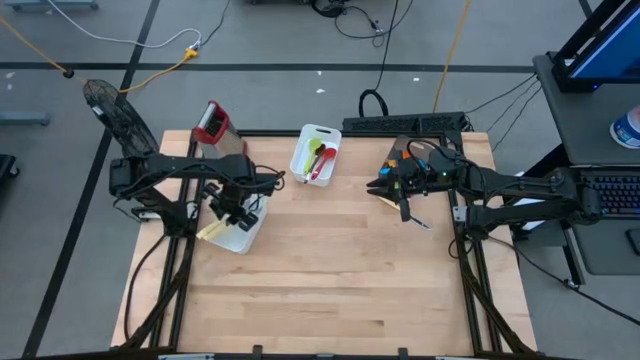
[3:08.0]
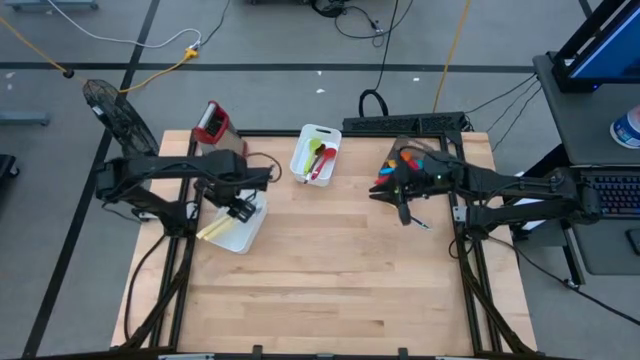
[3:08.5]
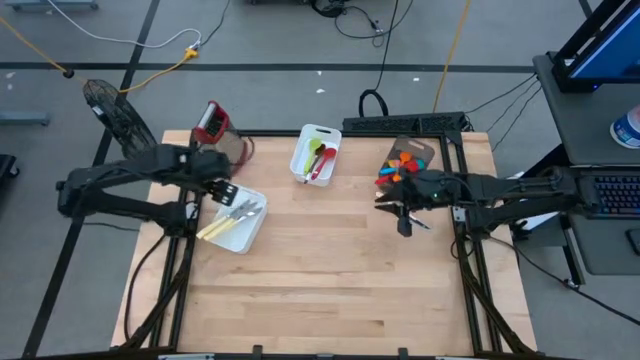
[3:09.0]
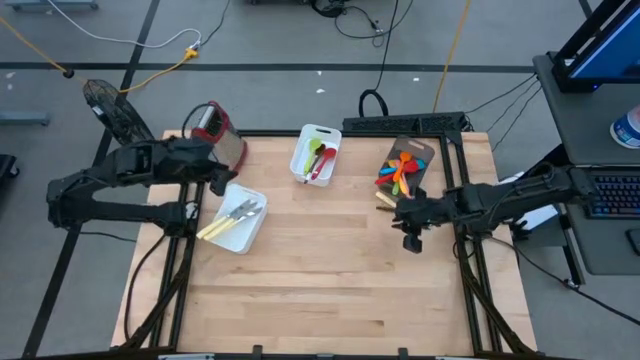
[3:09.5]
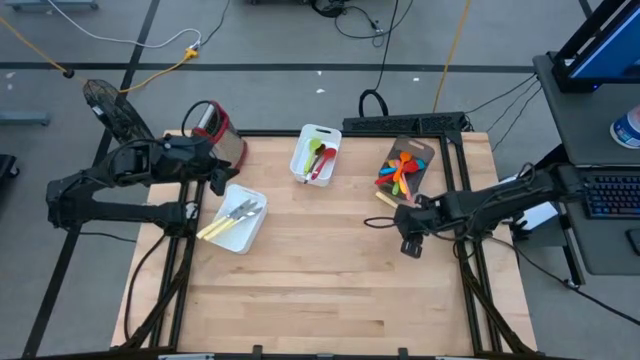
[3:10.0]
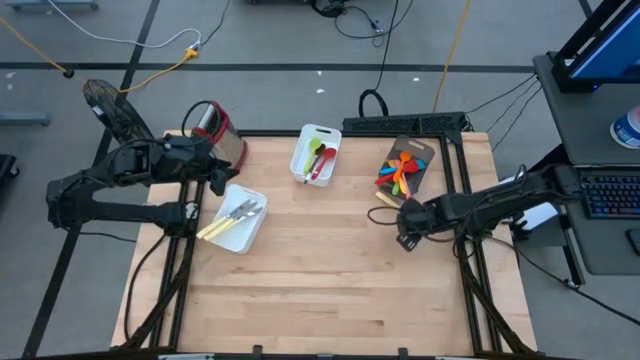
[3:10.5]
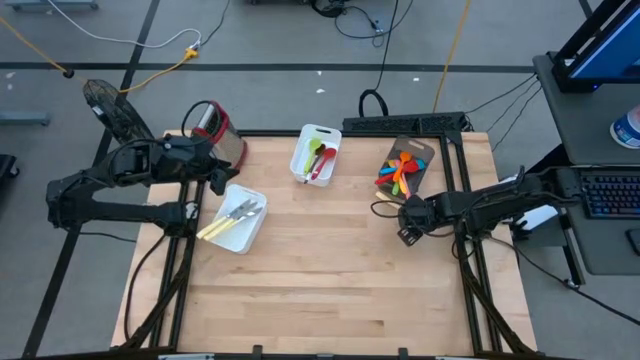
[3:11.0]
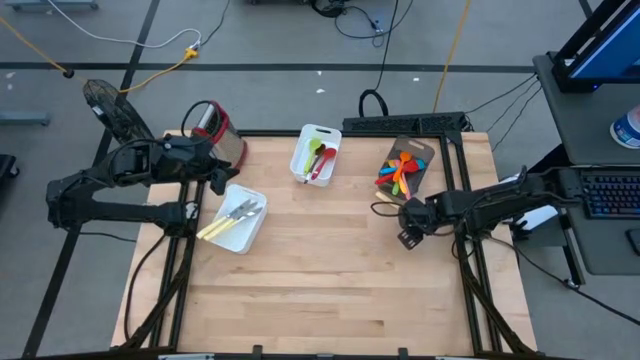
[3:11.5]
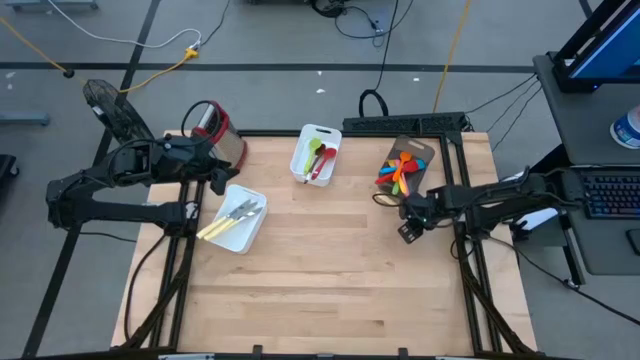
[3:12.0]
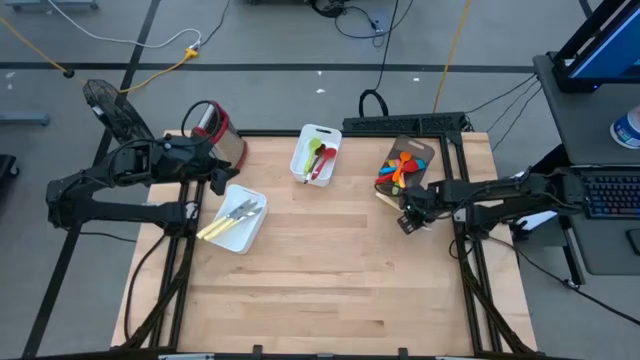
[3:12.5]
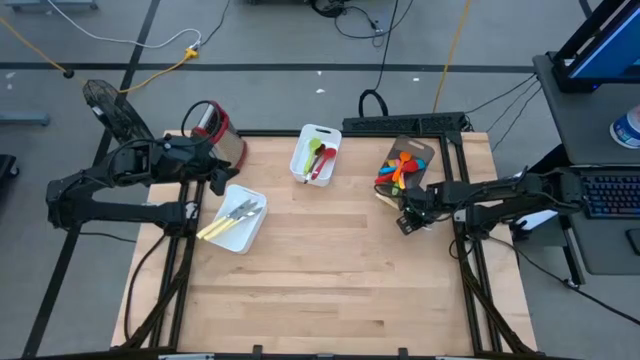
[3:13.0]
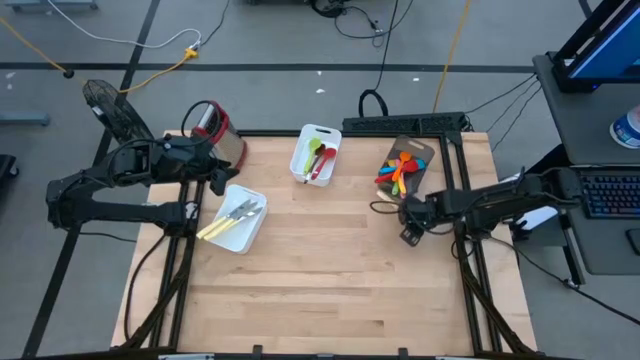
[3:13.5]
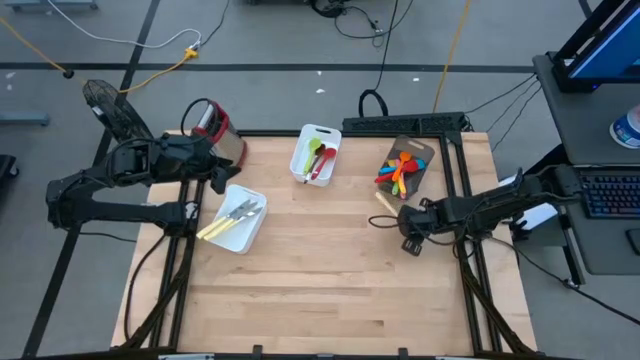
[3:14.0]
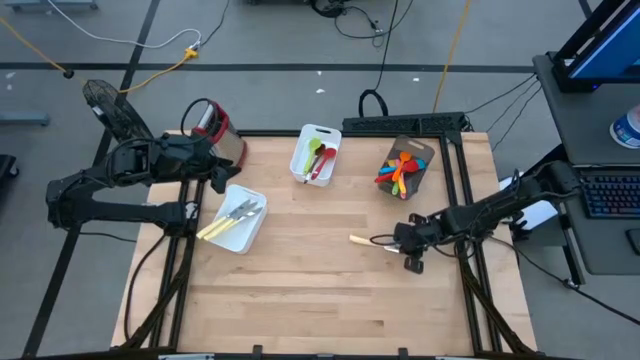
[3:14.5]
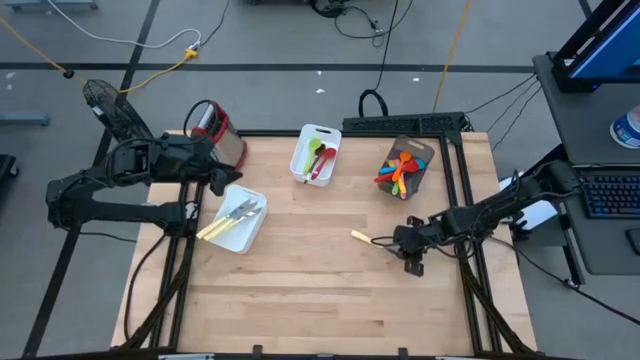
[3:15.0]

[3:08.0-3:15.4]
Task: Pick & Place Kitchen Items
Put the yellow knife into the bottom white bin

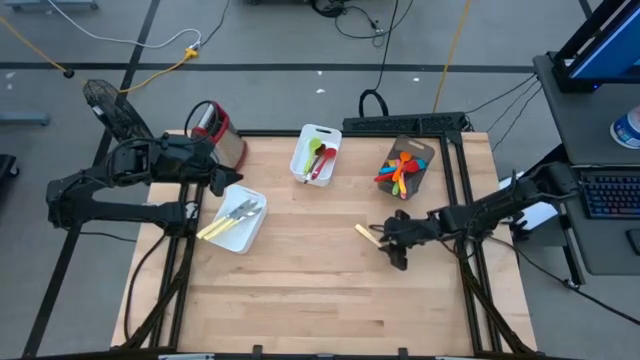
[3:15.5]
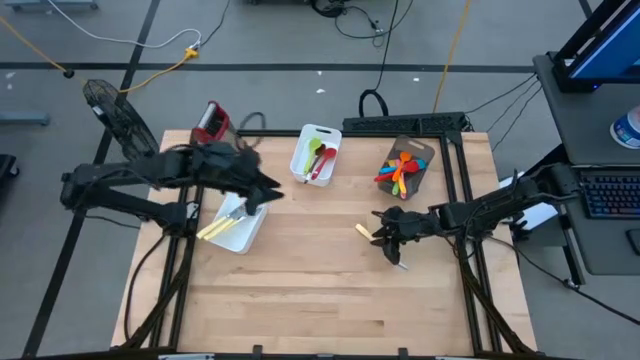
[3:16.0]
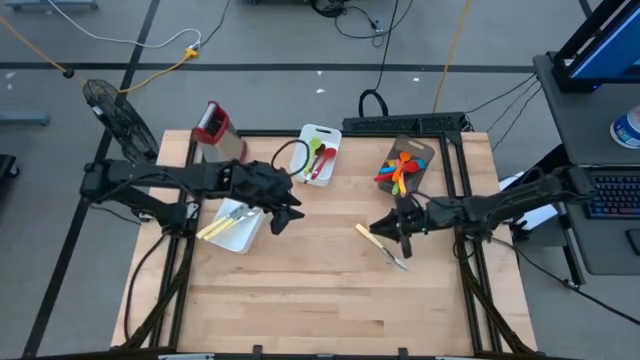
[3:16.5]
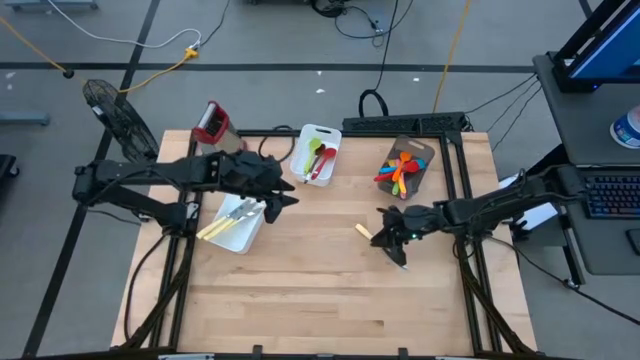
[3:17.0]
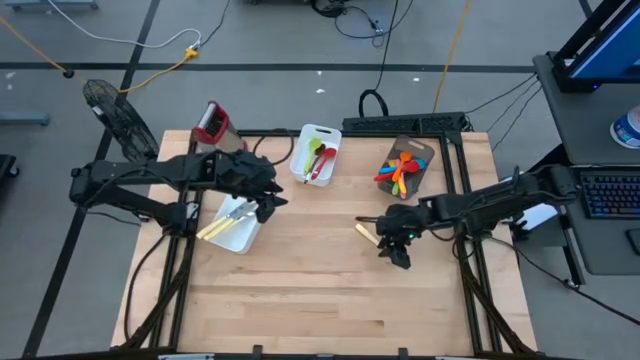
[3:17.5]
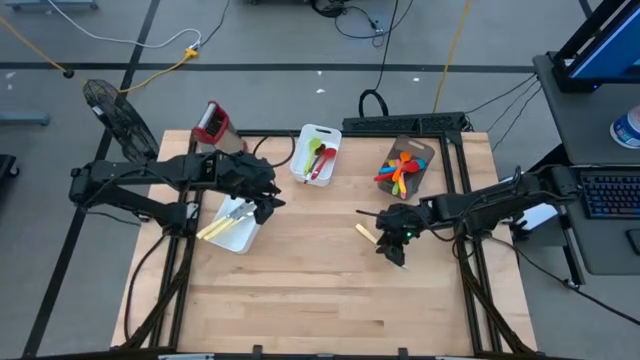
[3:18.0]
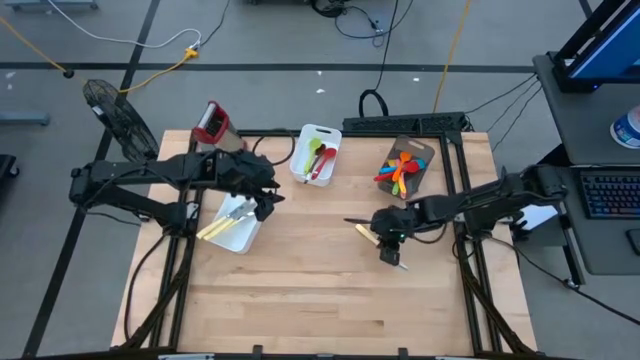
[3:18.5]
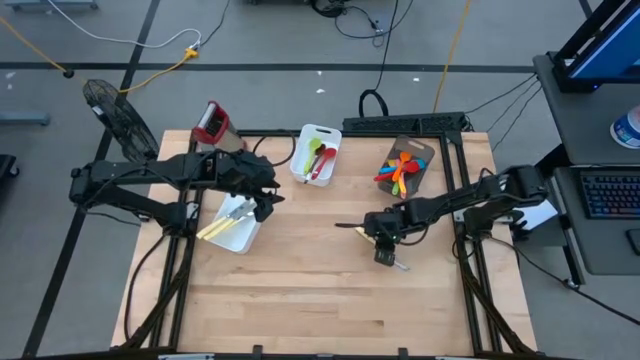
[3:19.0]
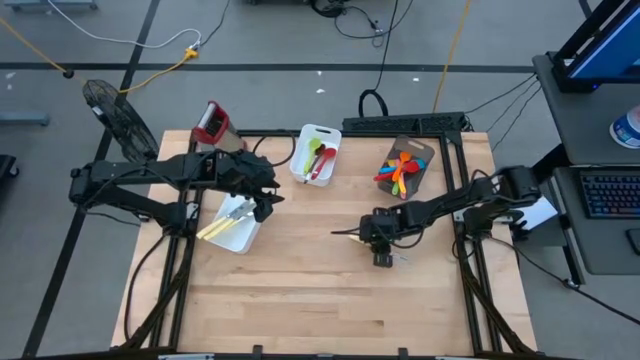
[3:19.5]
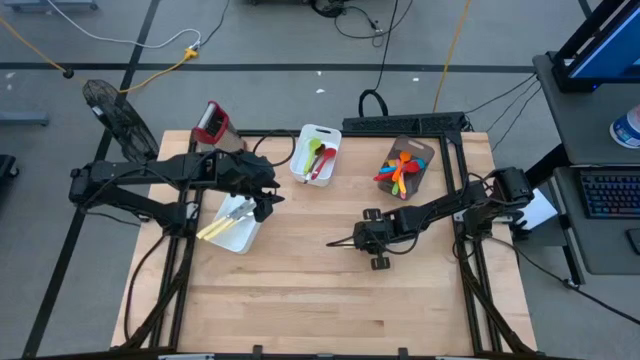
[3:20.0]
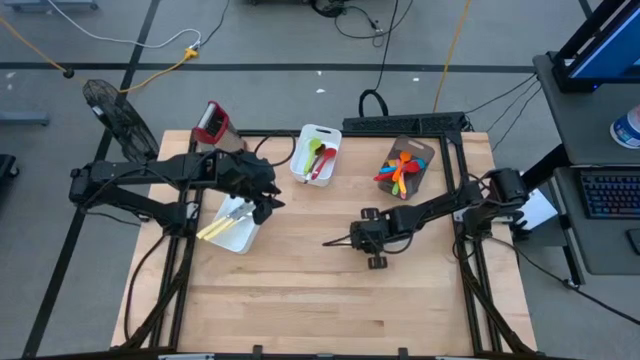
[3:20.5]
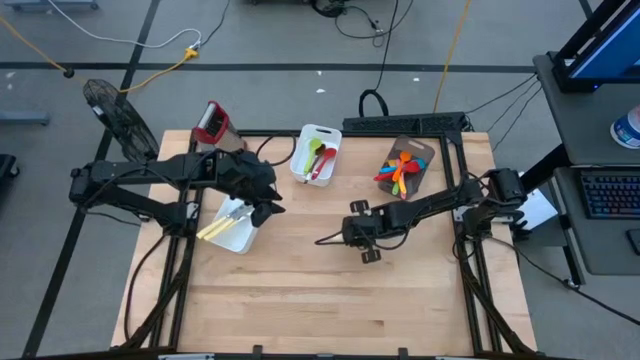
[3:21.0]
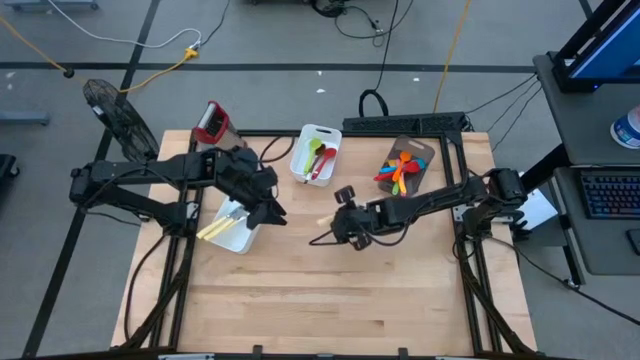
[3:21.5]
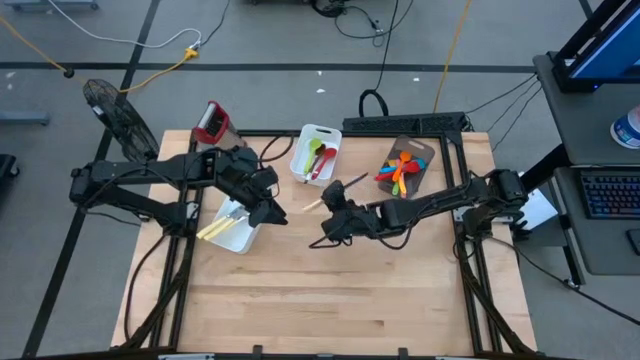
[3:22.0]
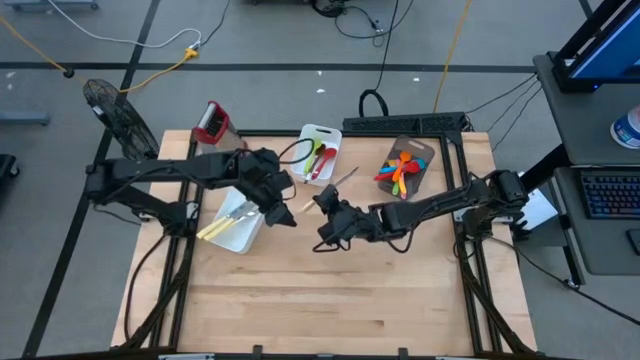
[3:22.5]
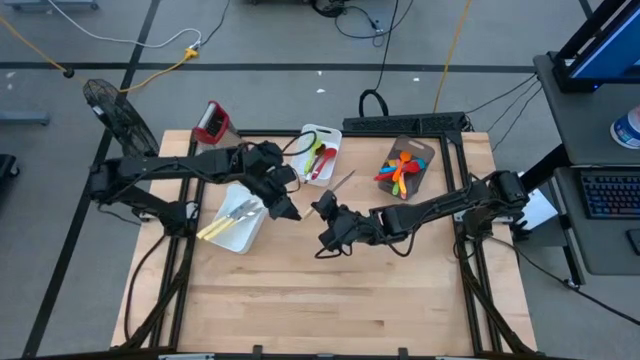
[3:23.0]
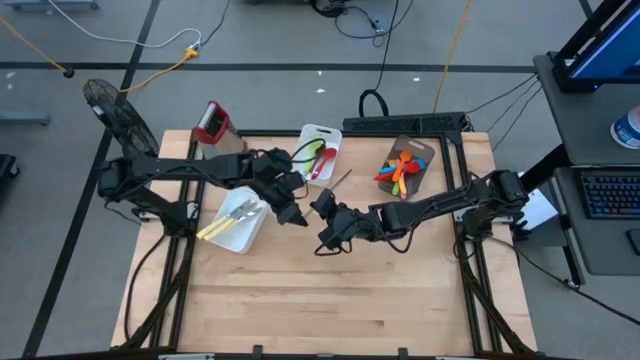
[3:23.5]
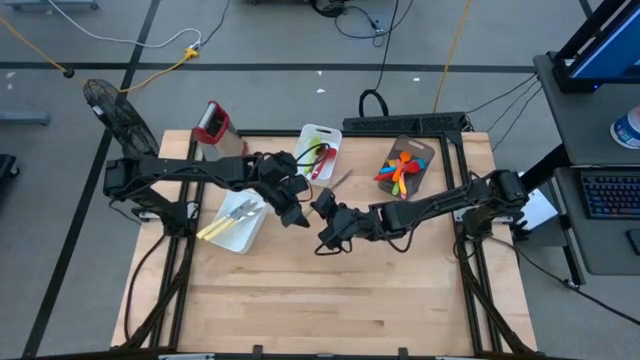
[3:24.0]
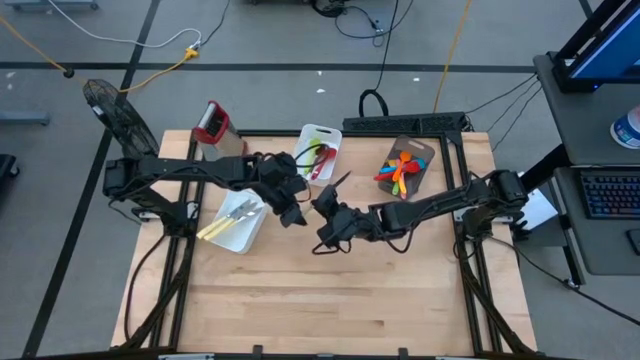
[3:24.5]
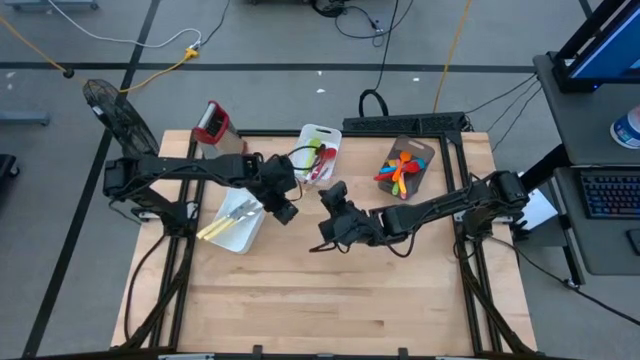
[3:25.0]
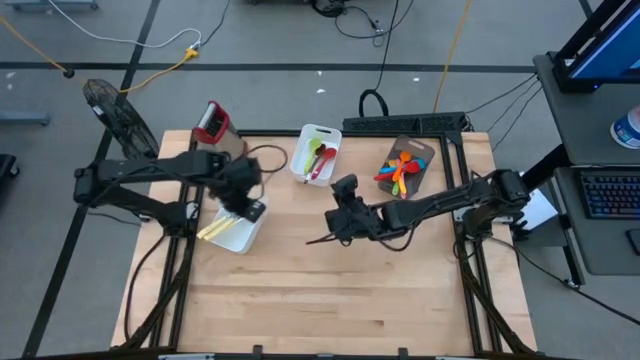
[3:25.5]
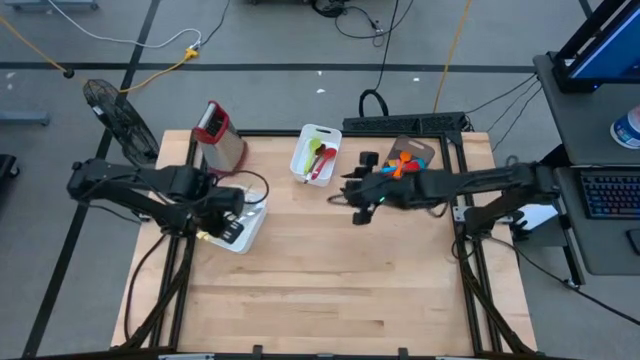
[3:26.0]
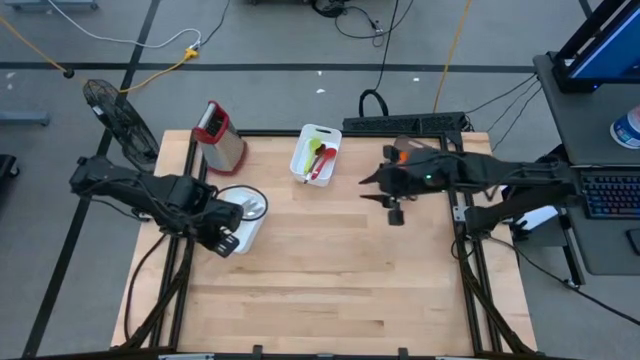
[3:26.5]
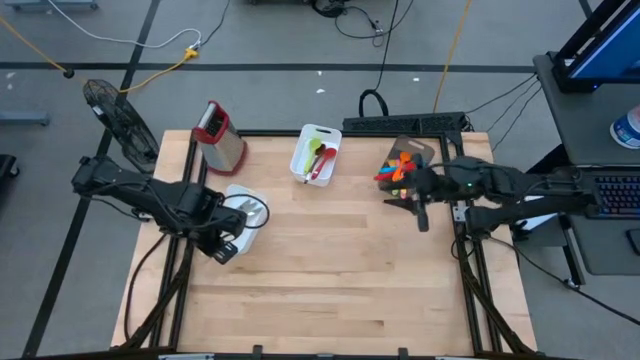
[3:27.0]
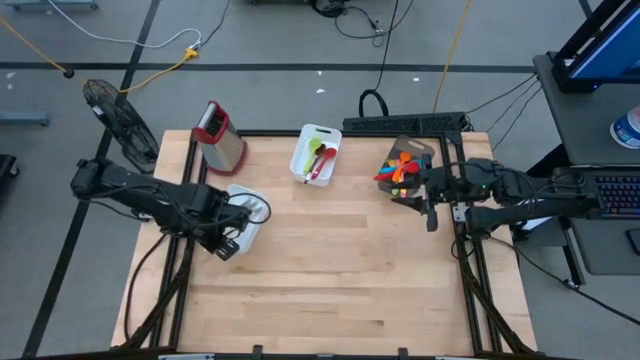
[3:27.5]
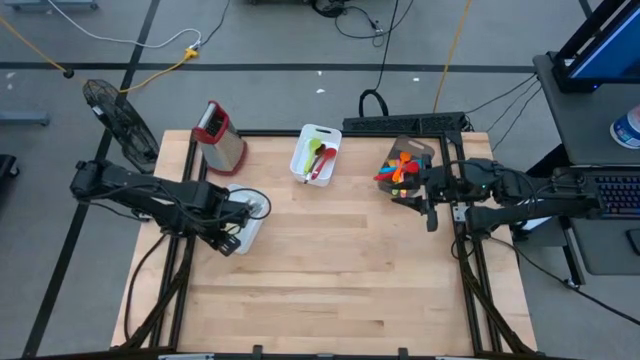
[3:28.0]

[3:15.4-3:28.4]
Put the yellow knife into the bottom white bin

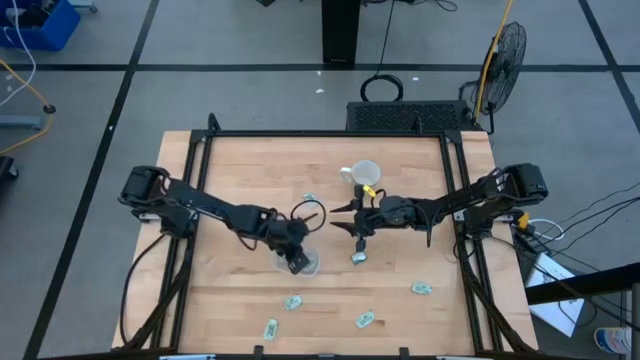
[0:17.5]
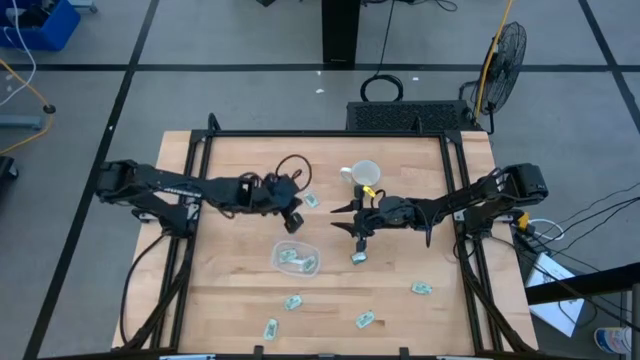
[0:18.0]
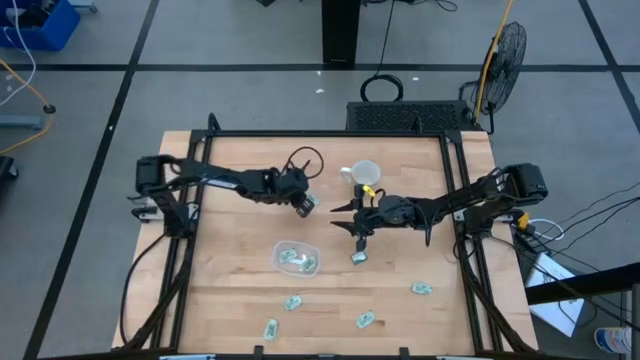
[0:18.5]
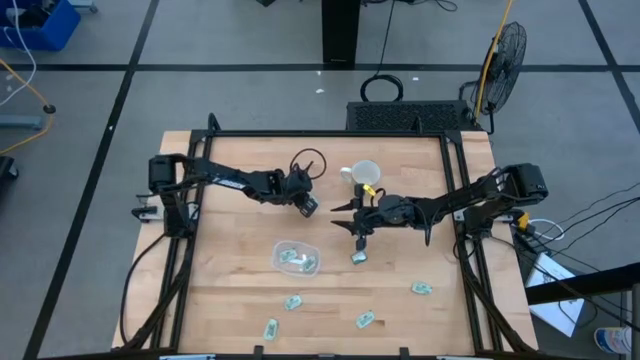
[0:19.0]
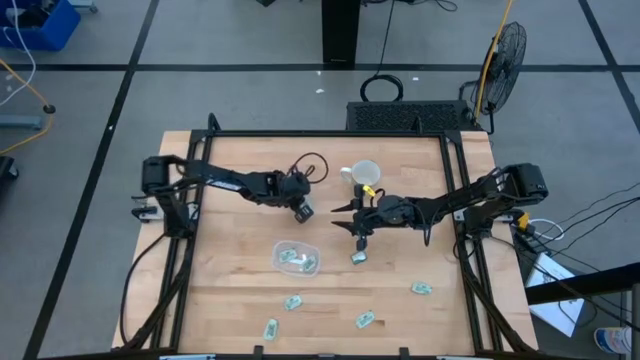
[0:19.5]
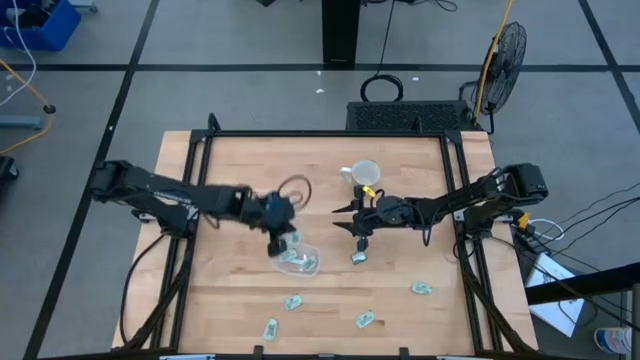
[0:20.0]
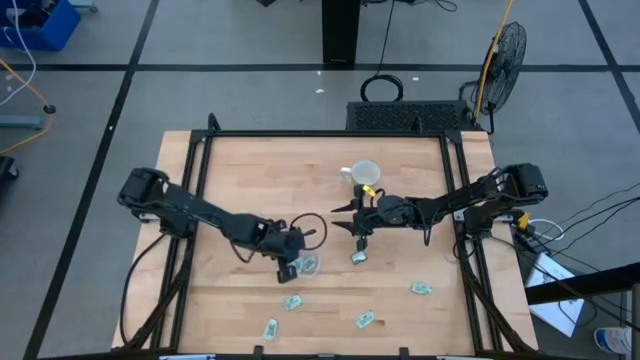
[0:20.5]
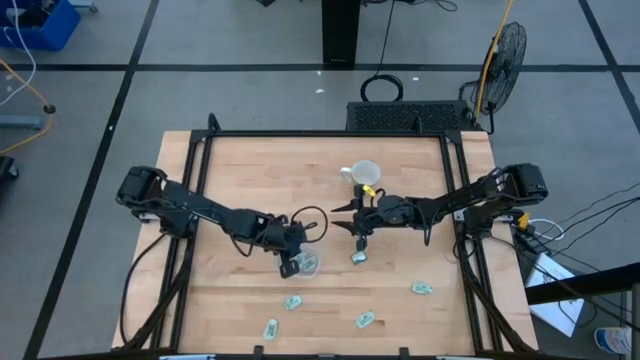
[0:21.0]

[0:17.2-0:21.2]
Task: Pick and place Stevia / Truvia into bins
Put the light green stevia packet into the transparent bin
